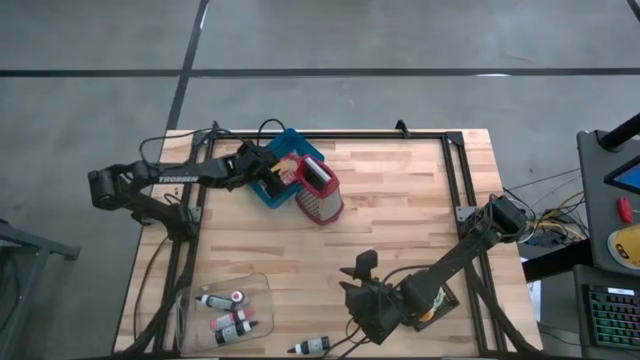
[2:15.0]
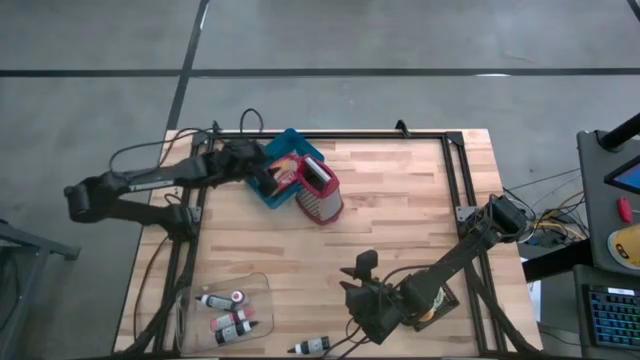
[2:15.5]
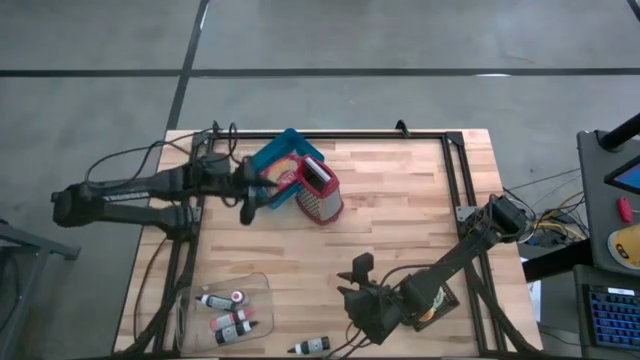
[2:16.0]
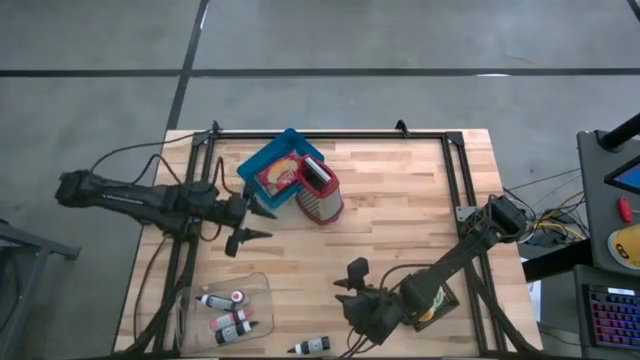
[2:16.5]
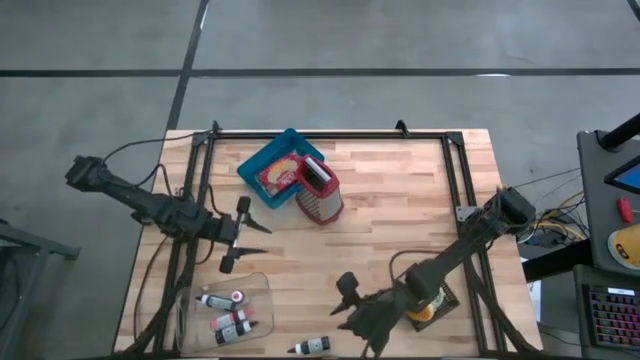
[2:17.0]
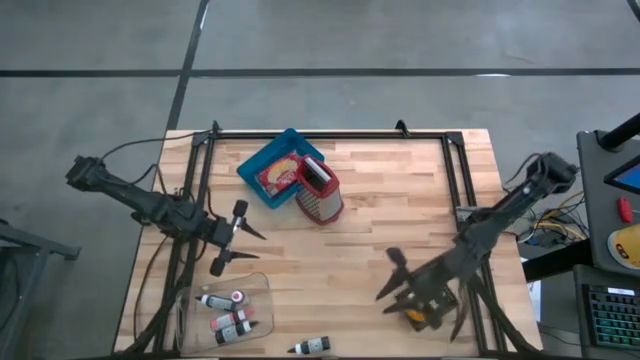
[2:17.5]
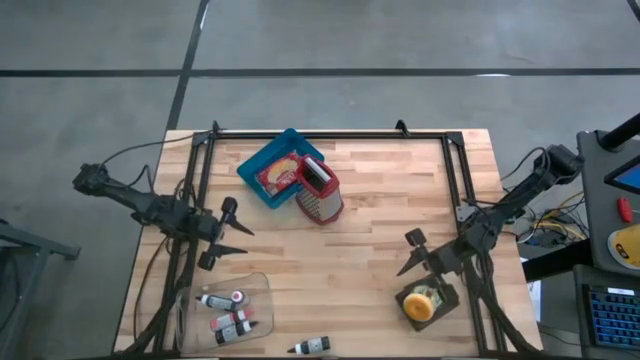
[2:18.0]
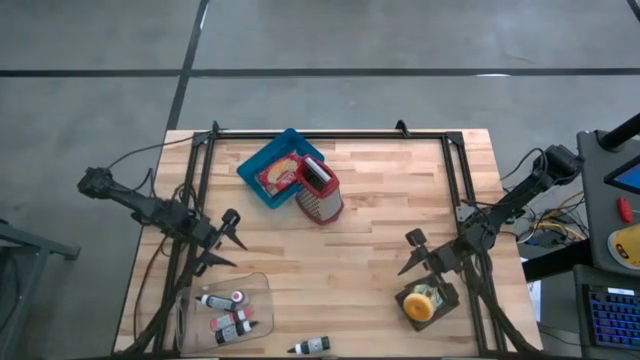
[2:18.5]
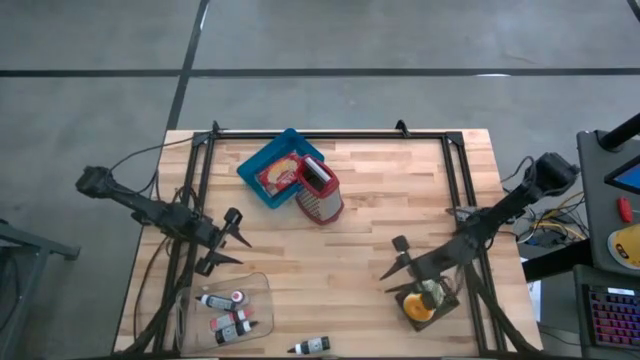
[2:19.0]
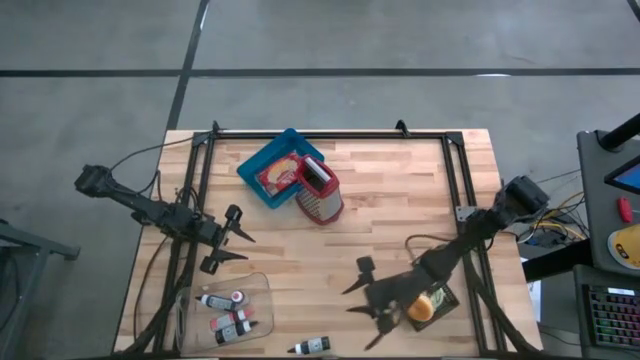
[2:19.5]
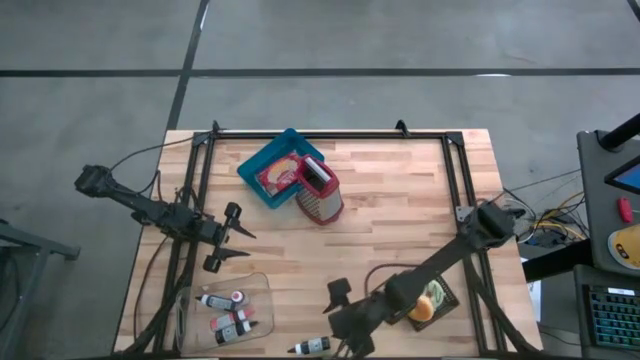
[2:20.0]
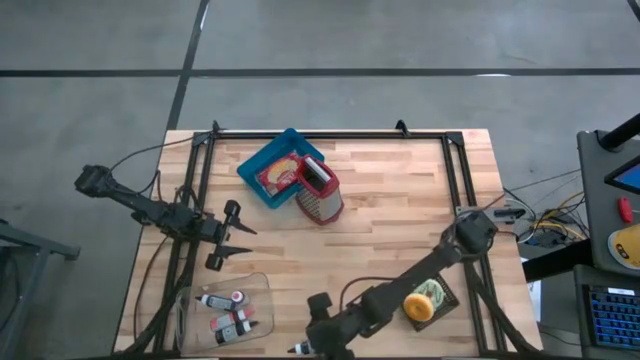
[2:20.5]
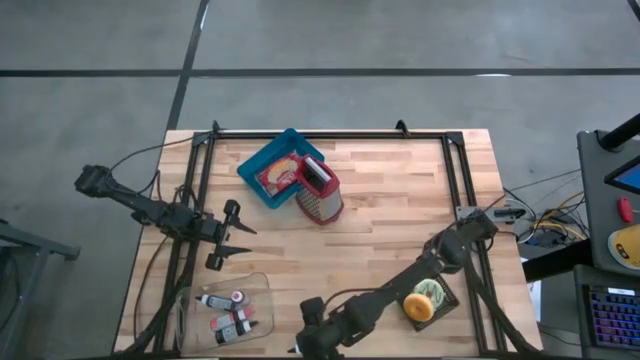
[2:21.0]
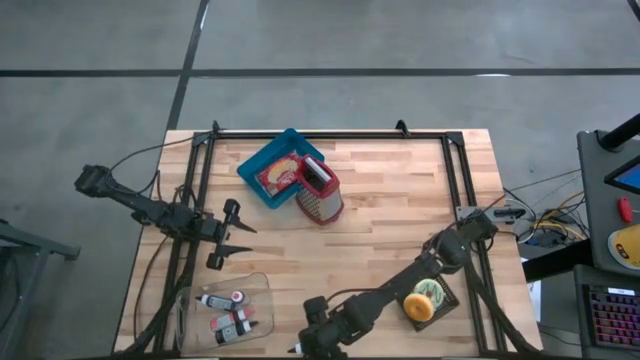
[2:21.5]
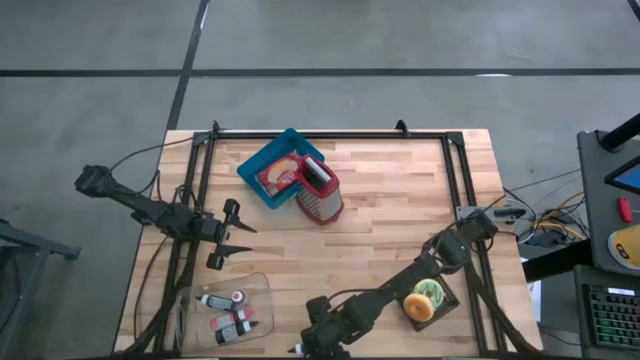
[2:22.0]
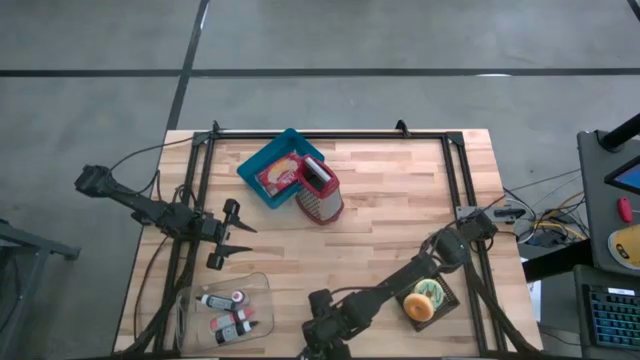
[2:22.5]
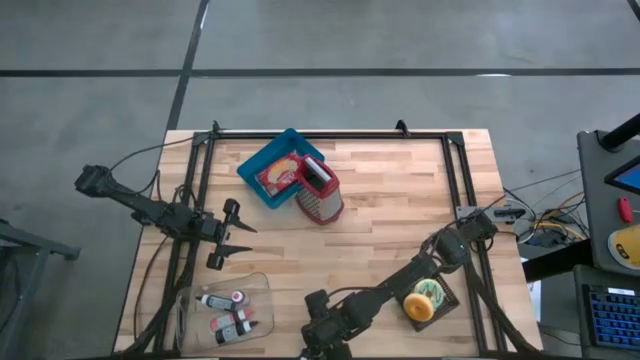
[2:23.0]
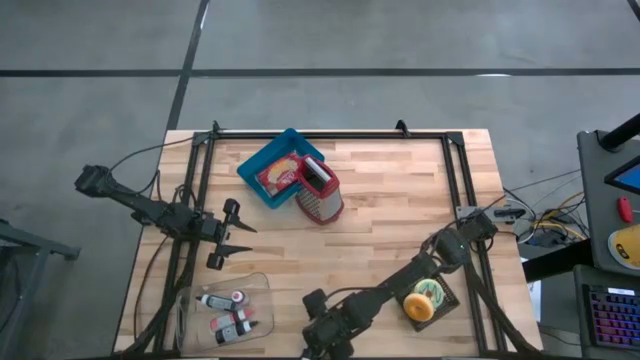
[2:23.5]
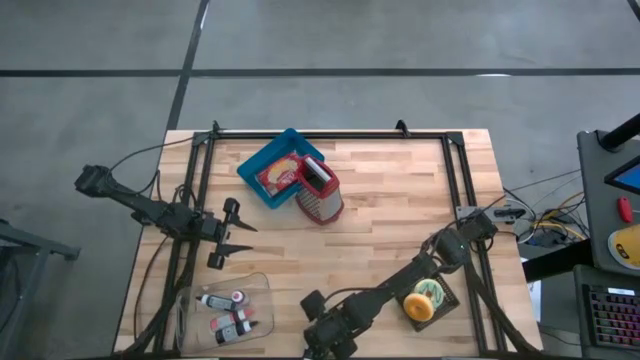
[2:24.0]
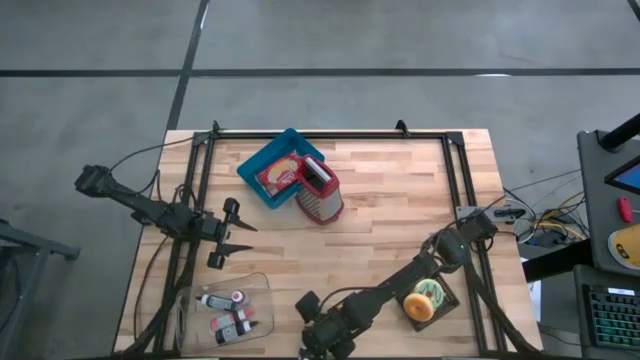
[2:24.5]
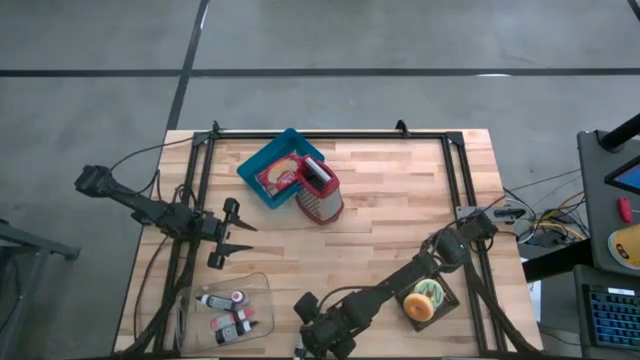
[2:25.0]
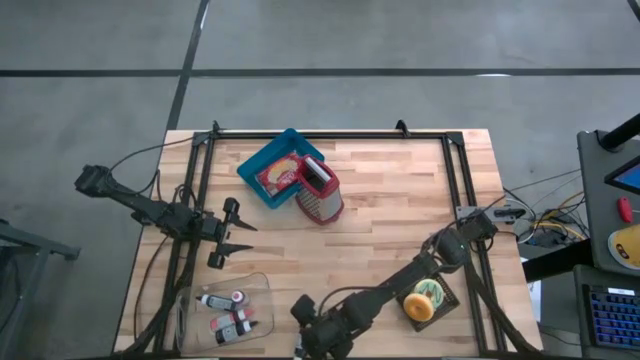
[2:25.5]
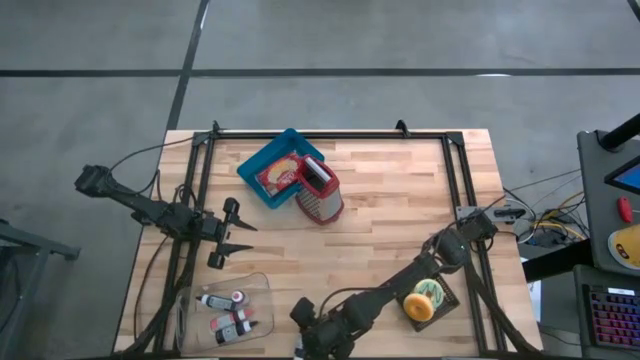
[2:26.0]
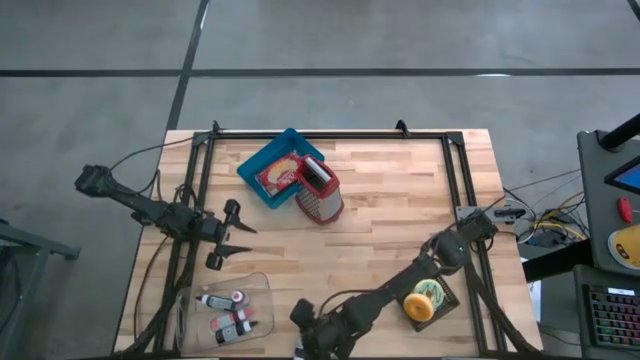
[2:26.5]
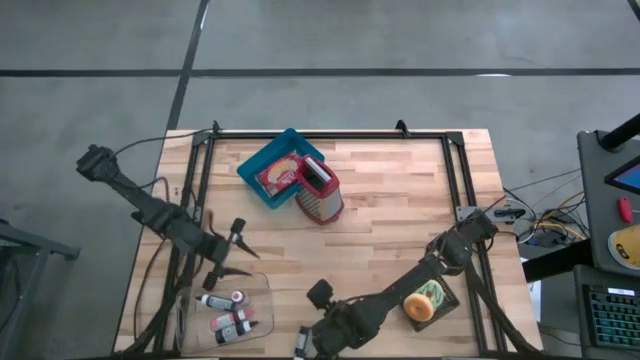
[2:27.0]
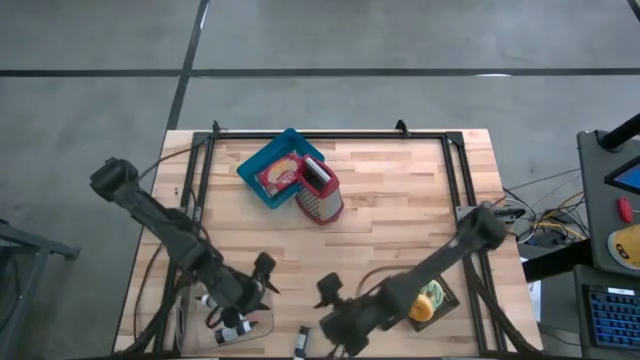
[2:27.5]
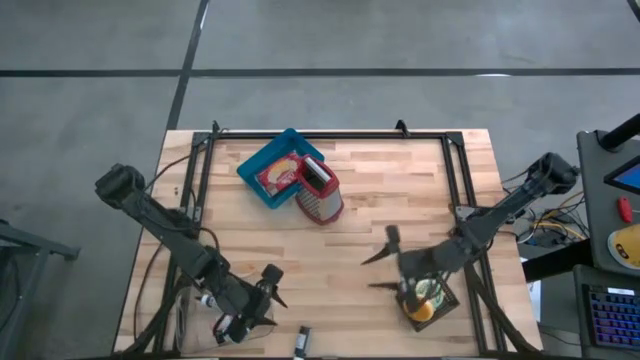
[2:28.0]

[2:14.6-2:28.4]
Put the black food coloring into the transparent bin
